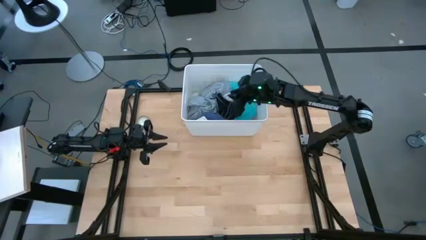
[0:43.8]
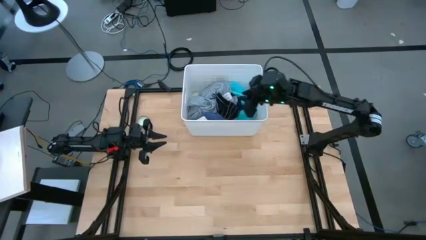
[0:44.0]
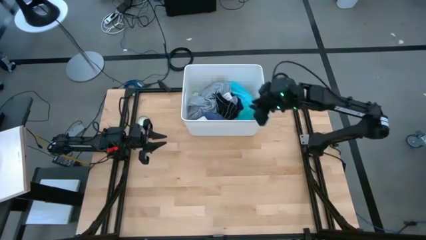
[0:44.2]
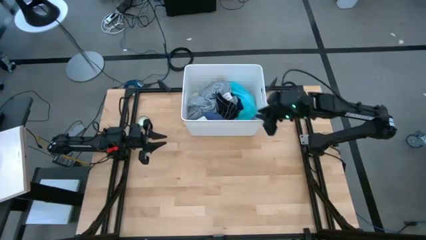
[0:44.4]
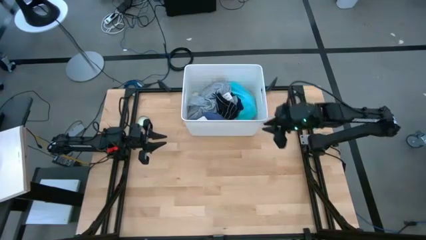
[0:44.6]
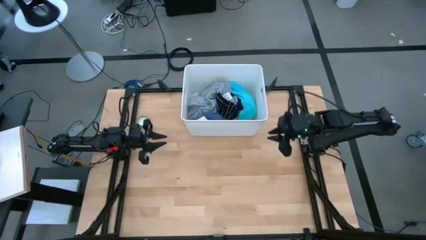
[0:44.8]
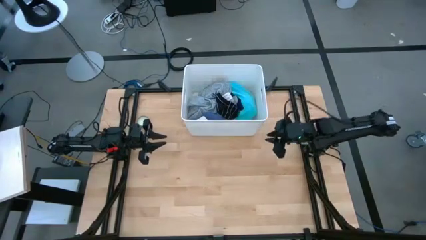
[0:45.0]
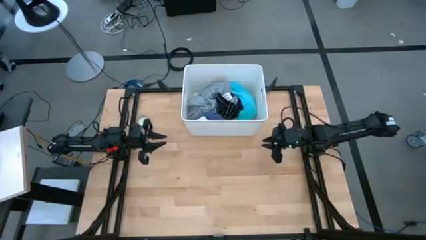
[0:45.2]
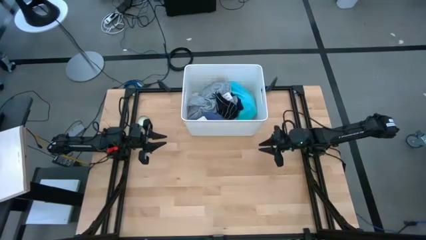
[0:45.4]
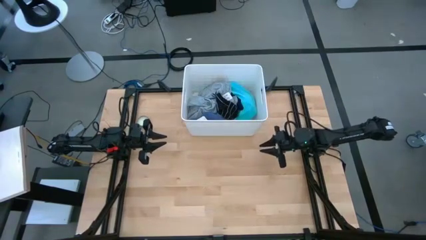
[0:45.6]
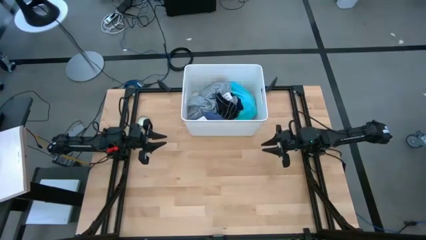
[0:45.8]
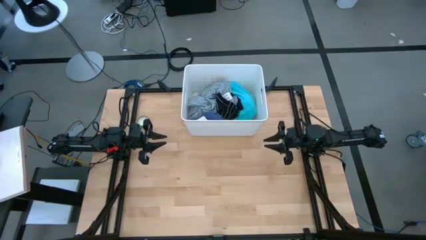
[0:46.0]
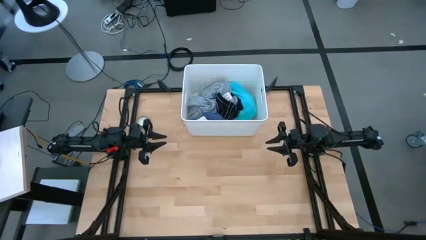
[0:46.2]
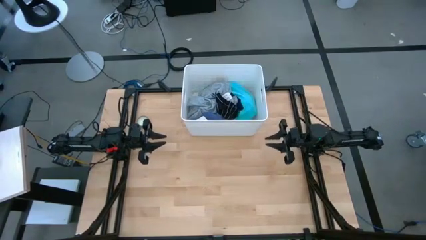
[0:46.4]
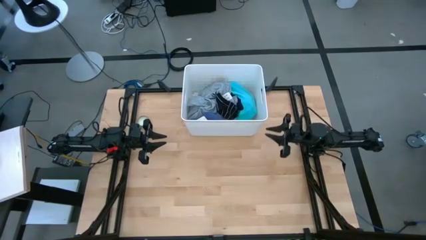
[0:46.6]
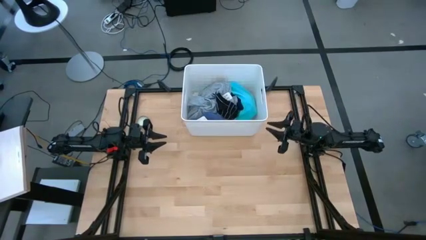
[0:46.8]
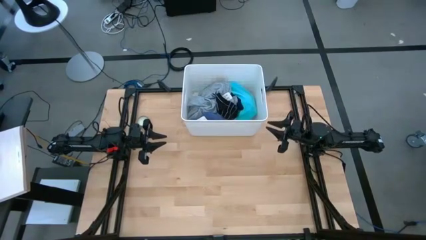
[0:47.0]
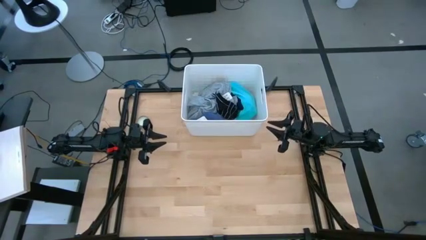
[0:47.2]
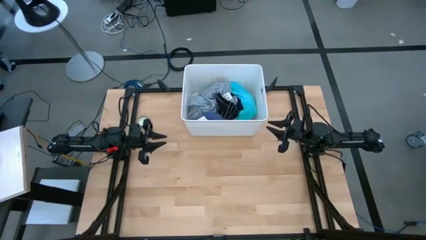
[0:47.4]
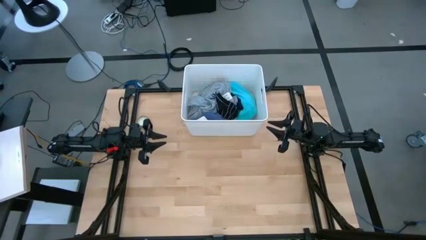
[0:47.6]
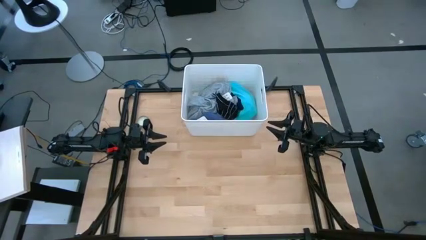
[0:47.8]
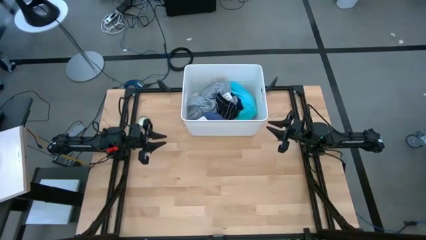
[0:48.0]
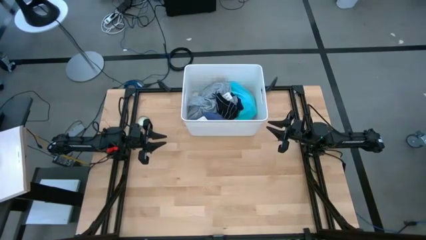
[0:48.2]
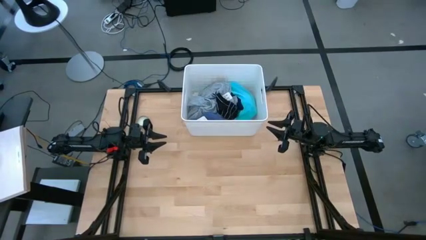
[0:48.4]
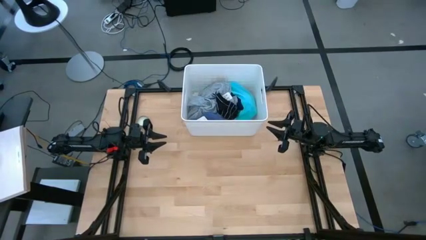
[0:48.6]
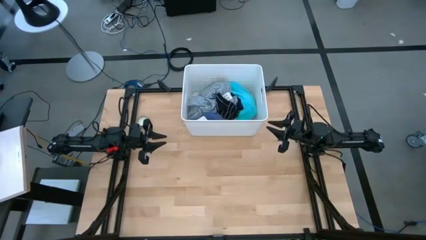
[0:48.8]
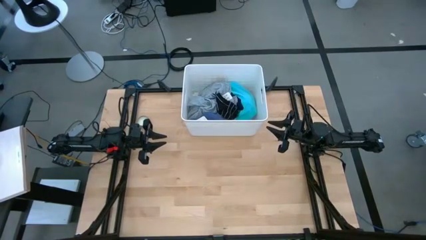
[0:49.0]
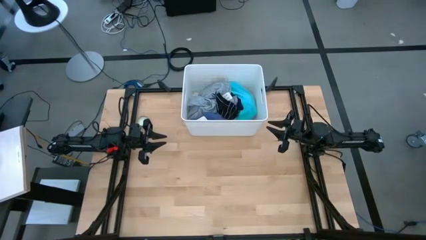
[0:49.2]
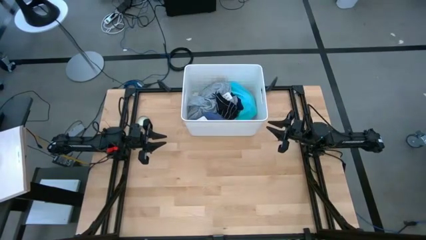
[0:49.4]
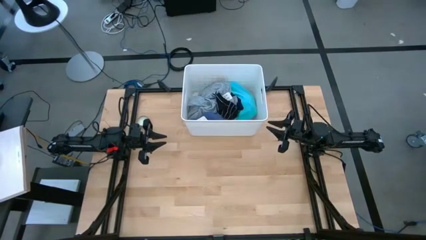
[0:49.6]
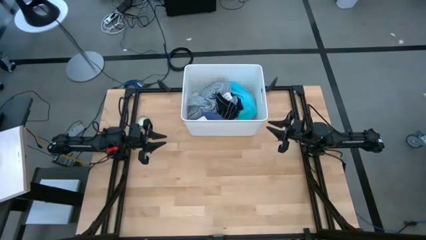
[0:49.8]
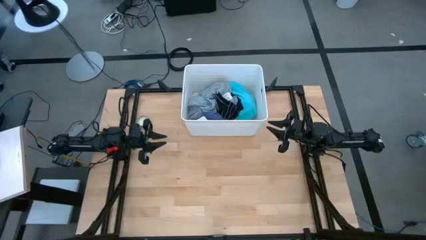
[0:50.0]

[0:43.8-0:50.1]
Task: Sort clothes
Return to Home Position

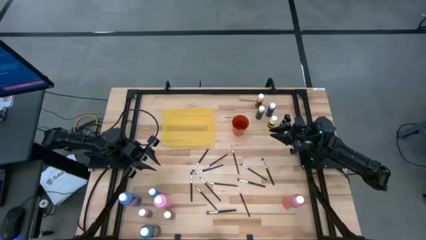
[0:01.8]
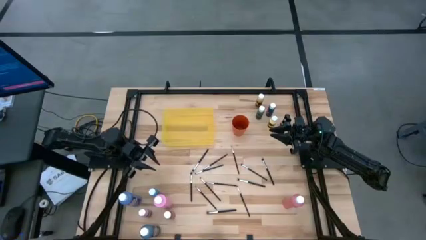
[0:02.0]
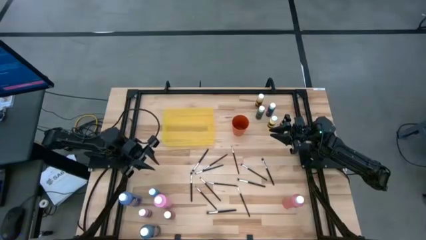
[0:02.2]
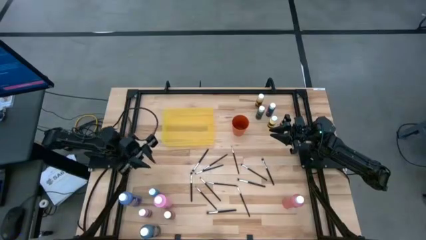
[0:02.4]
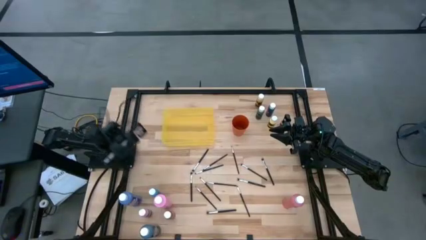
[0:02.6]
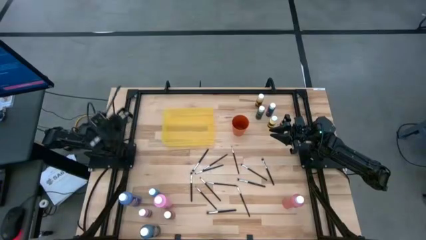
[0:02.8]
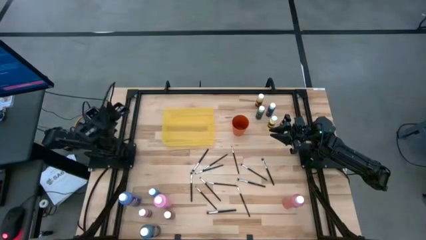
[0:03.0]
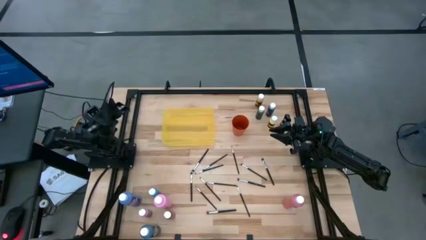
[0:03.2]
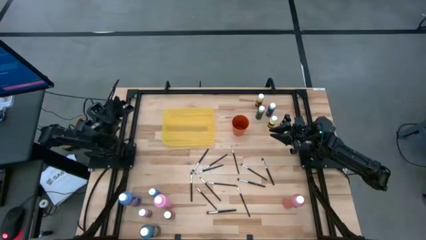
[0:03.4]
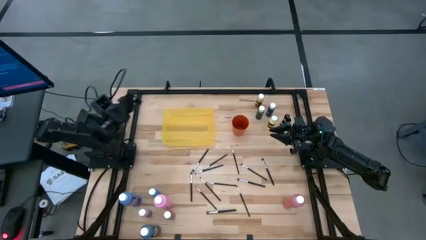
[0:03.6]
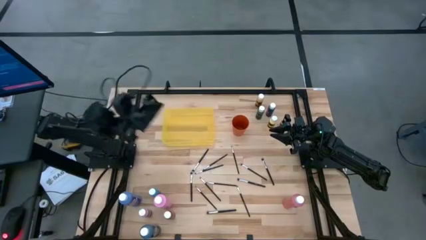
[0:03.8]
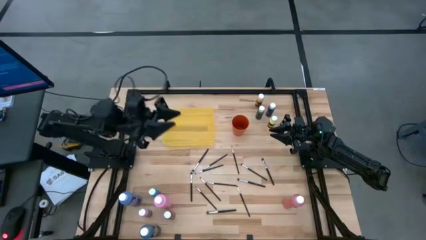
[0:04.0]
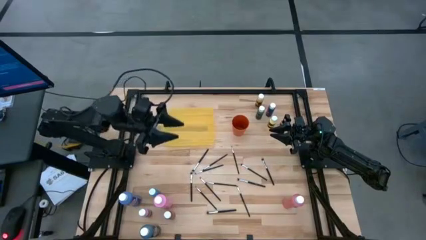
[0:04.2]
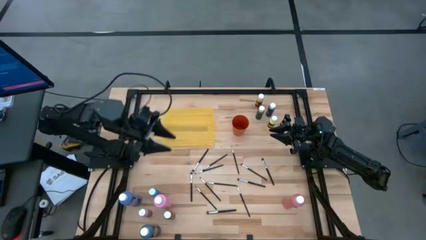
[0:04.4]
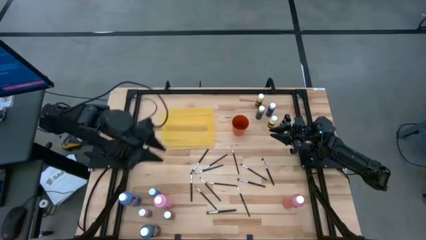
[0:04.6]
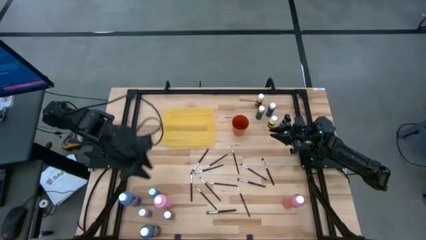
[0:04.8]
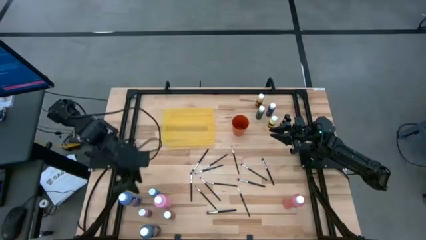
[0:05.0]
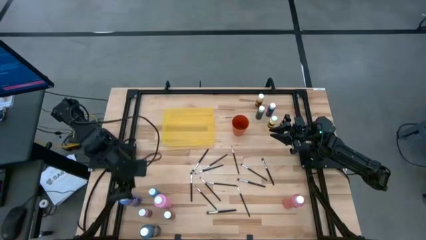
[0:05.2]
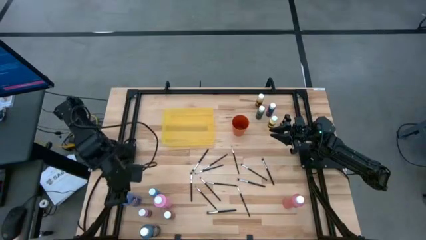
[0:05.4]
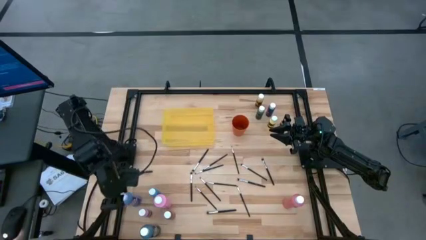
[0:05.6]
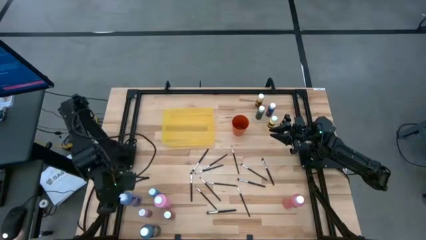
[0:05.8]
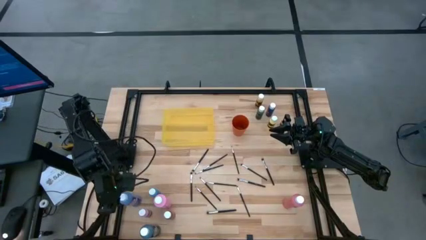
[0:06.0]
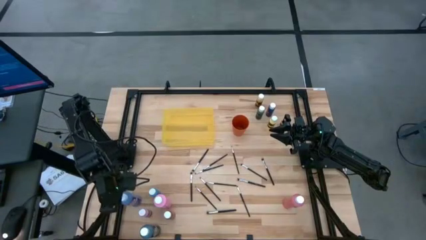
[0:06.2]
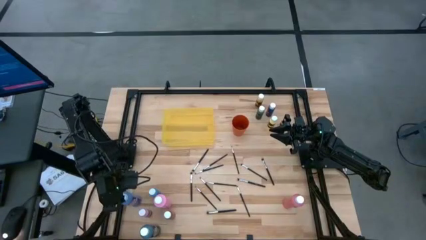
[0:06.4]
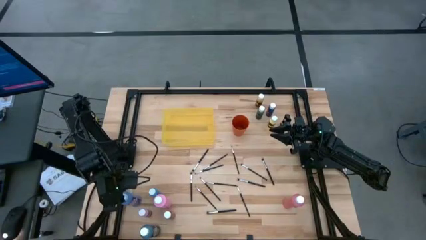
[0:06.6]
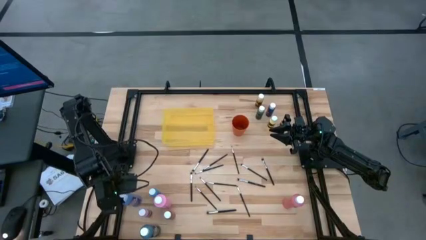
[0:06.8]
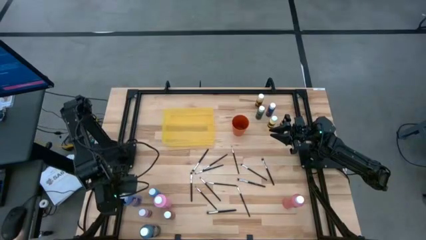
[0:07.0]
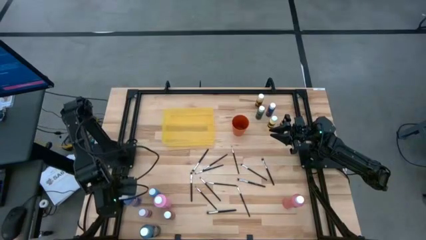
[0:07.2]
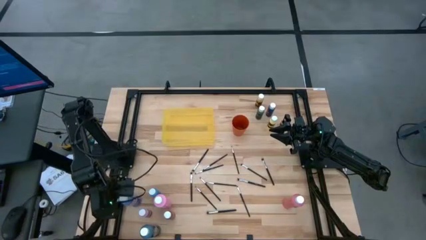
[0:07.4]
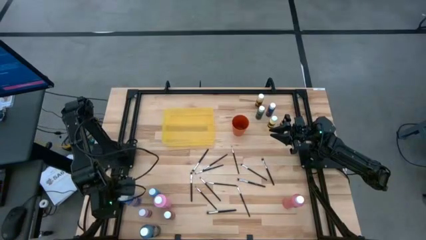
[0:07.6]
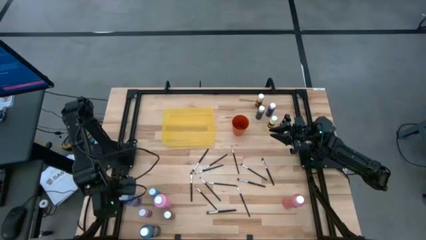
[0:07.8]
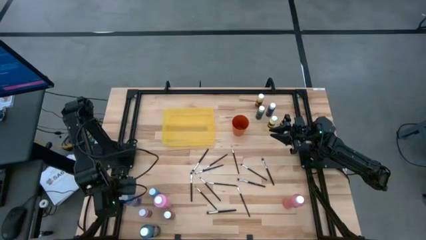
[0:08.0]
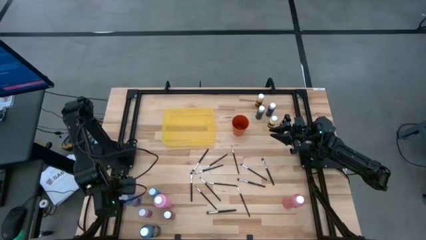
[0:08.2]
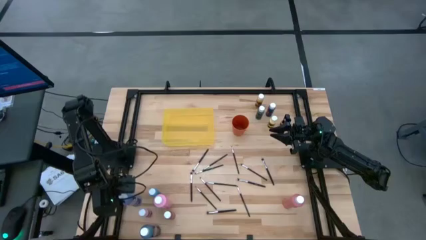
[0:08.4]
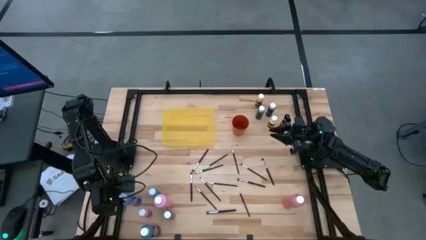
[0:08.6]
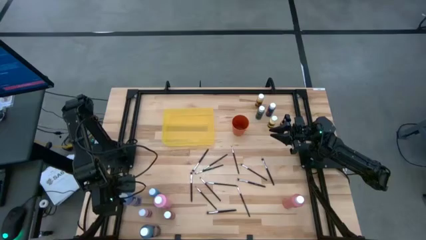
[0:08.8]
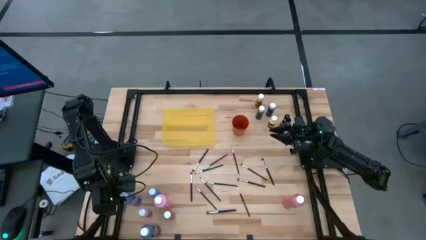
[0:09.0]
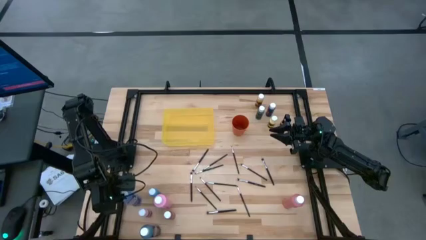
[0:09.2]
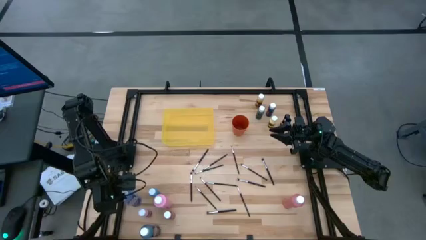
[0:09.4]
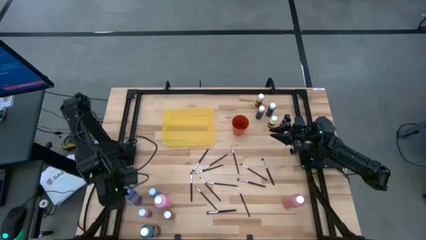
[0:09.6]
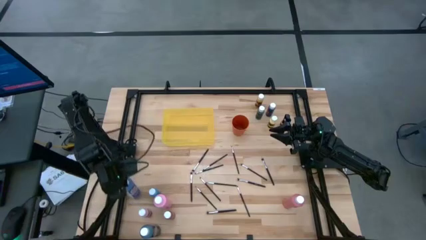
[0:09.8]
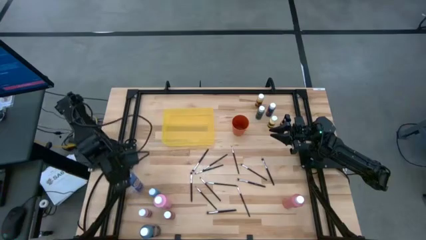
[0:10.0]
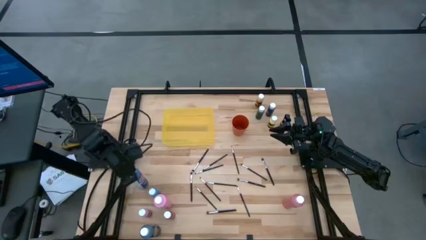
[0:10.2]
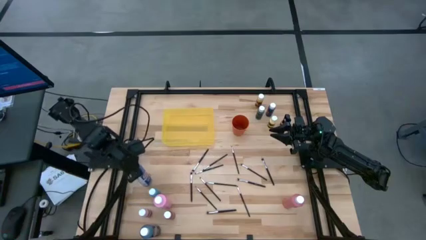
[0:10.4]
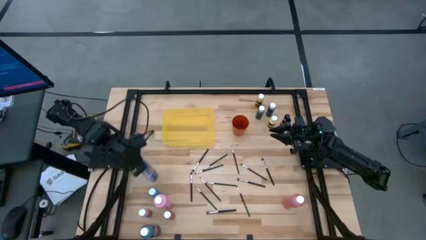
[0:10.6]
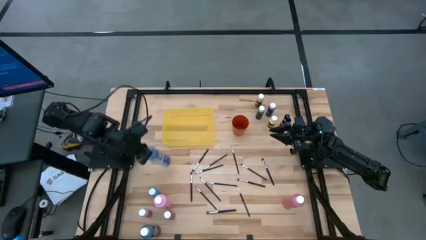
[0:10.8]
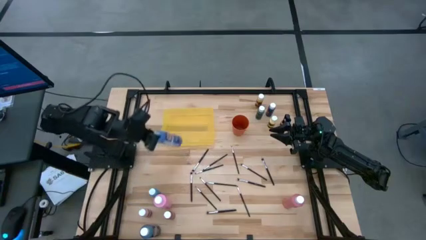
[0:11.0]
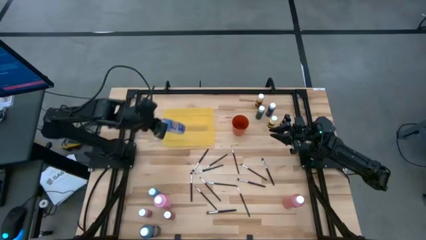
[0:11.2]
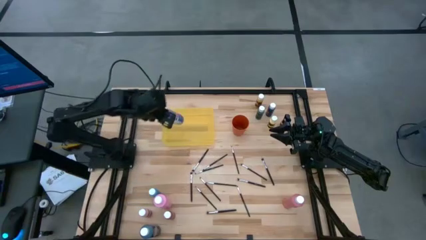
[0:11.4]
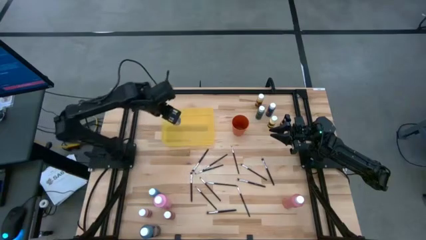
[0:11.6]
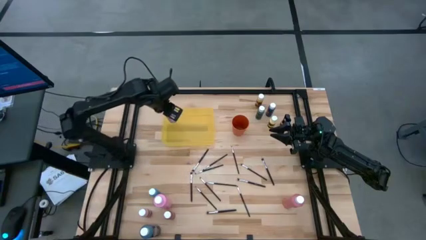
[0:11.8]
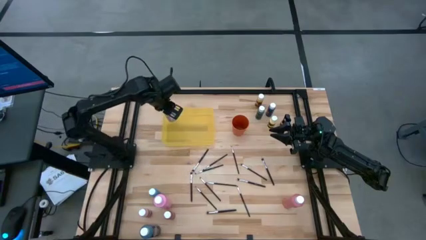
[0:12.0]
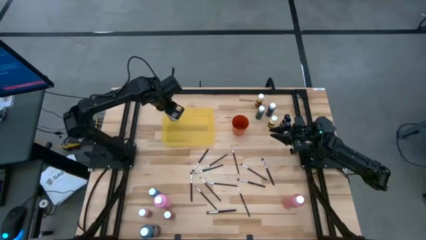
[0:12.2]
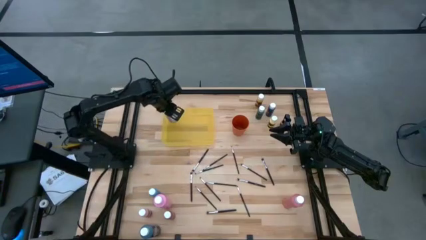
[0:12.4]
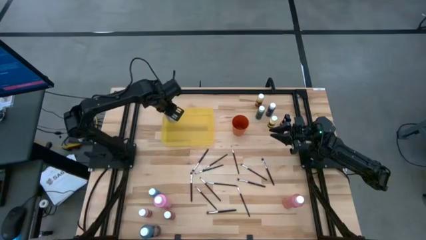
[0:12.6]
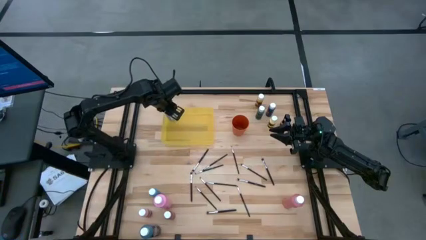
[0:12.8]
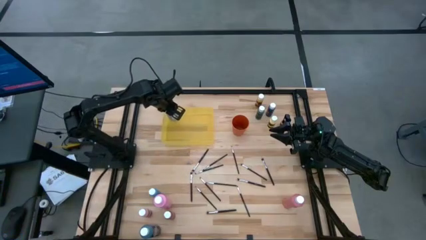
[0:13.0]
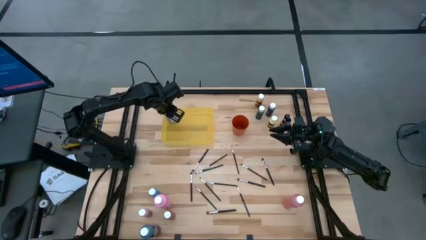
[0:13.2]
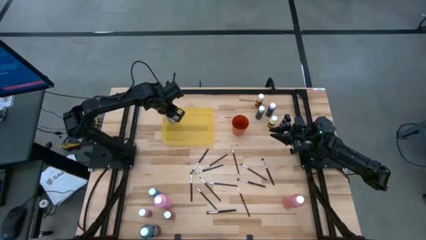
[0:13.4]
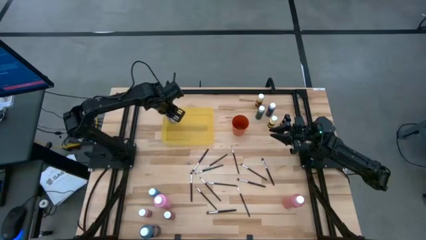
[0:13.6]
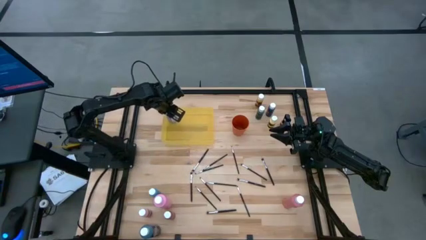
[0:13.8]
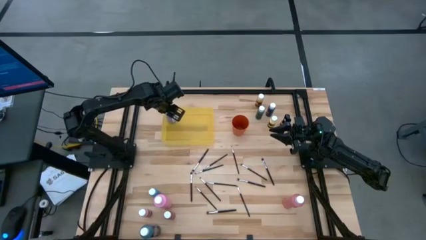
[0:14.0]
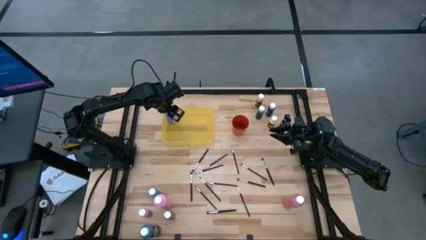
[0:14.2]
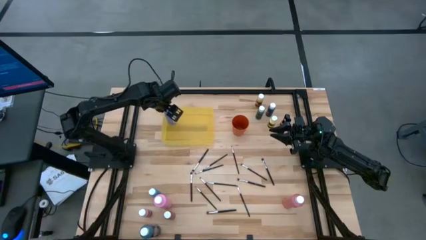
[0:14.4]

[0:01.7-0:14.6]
Task: Pick & Place Paint Supplies
Put the purple paint bottle into the yellow bin
